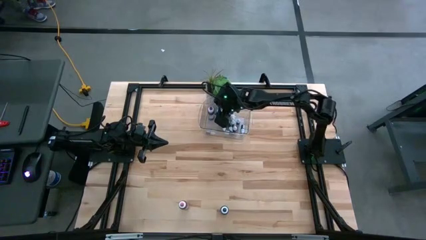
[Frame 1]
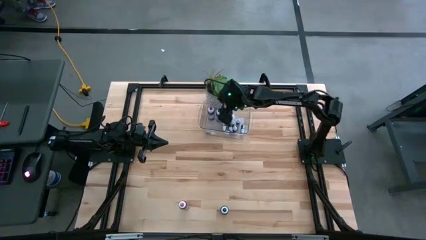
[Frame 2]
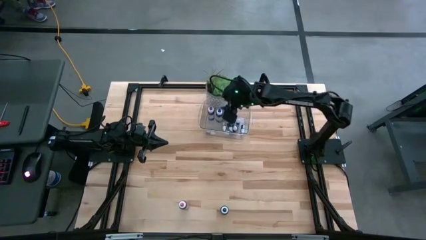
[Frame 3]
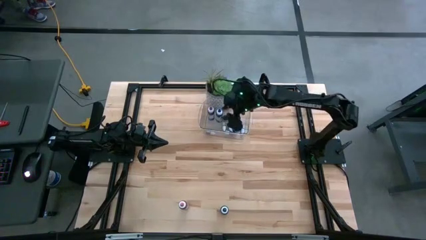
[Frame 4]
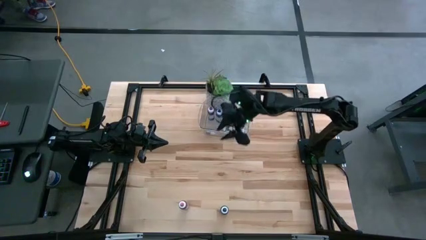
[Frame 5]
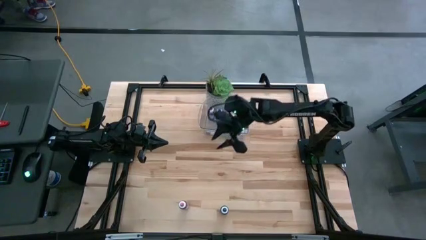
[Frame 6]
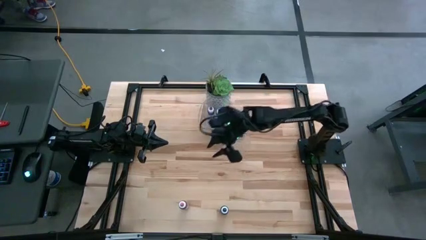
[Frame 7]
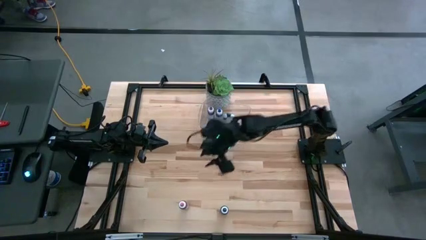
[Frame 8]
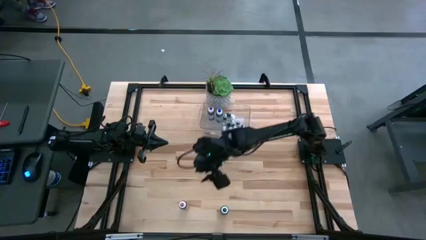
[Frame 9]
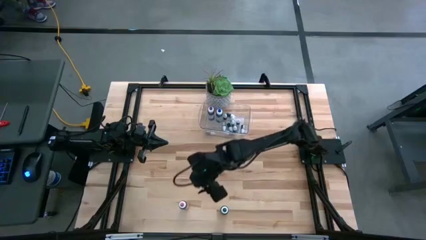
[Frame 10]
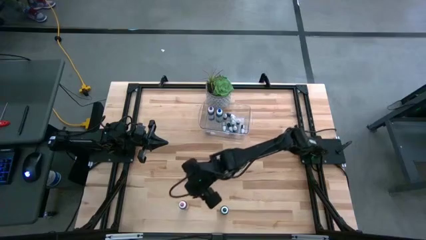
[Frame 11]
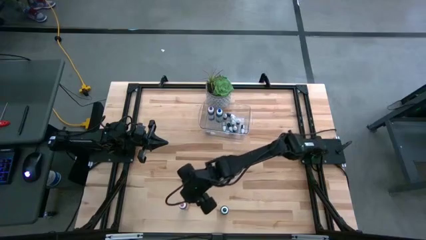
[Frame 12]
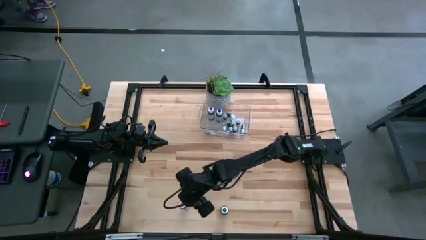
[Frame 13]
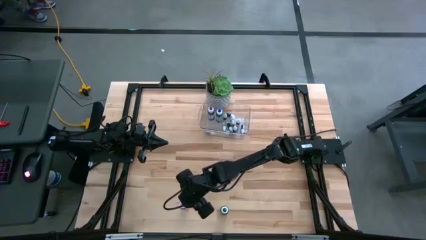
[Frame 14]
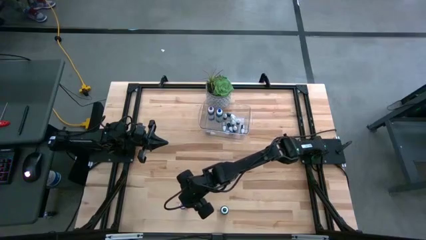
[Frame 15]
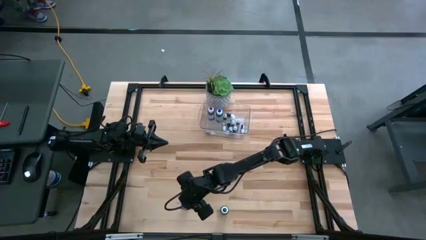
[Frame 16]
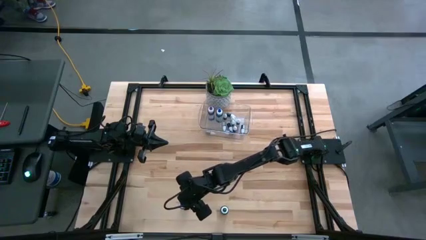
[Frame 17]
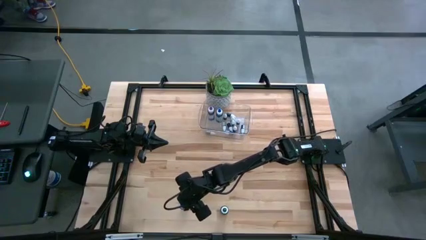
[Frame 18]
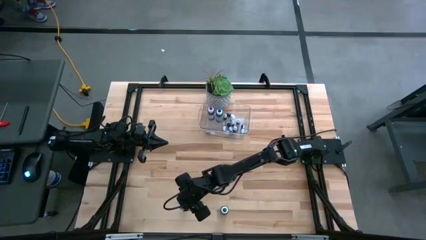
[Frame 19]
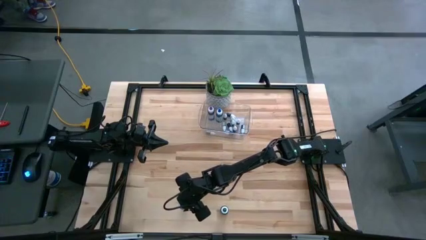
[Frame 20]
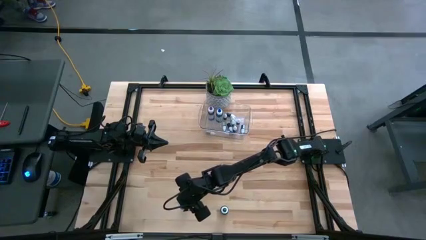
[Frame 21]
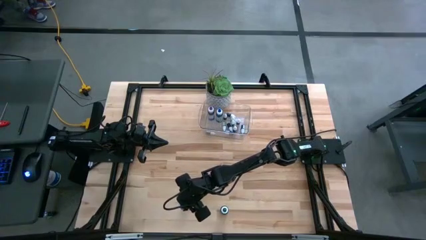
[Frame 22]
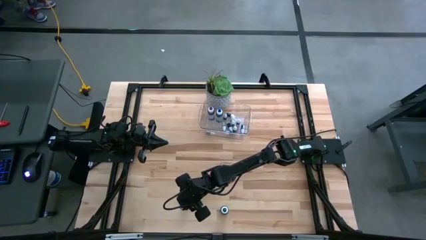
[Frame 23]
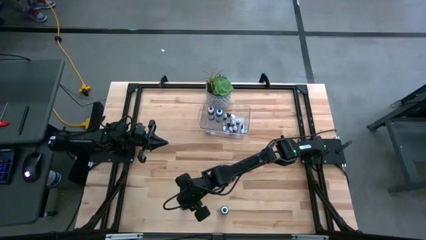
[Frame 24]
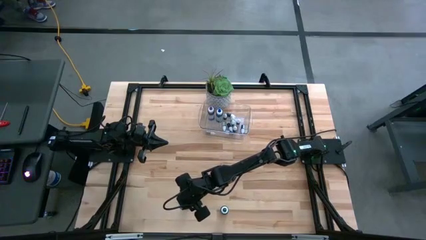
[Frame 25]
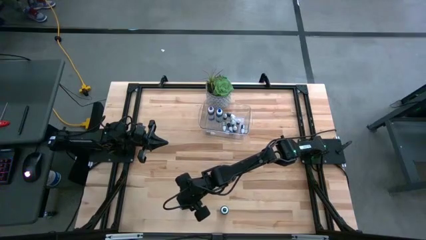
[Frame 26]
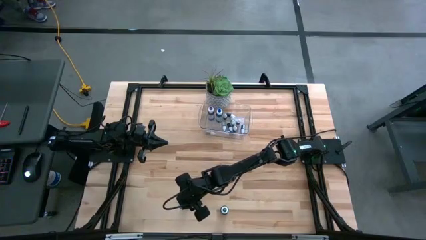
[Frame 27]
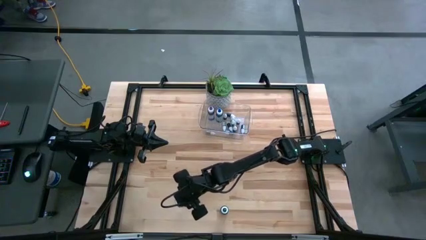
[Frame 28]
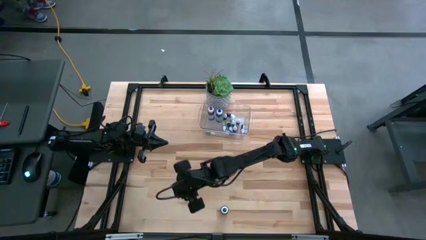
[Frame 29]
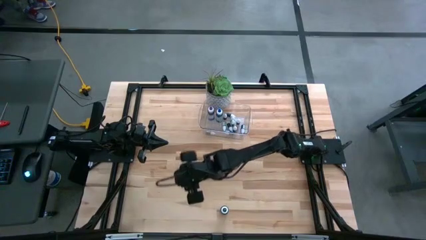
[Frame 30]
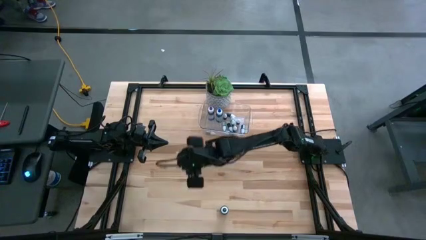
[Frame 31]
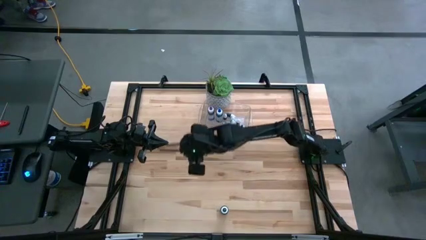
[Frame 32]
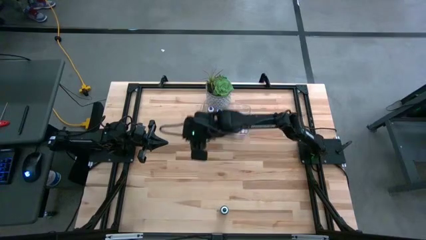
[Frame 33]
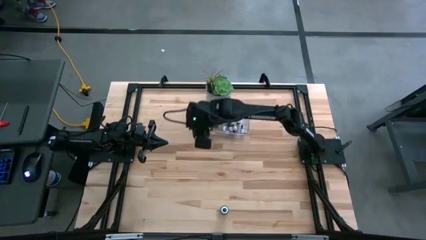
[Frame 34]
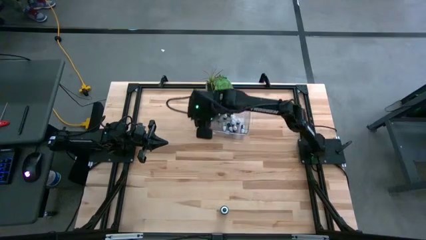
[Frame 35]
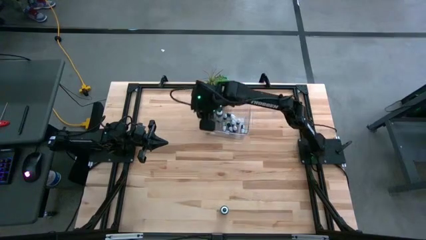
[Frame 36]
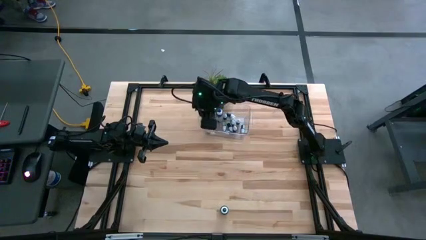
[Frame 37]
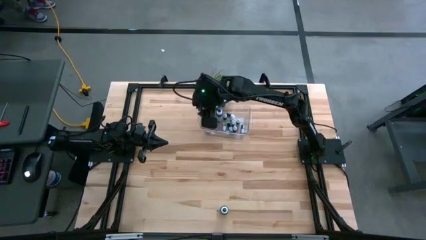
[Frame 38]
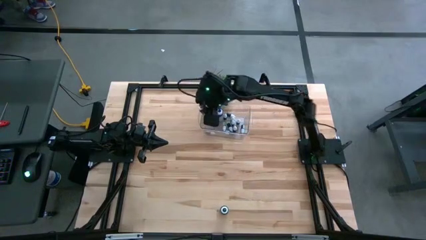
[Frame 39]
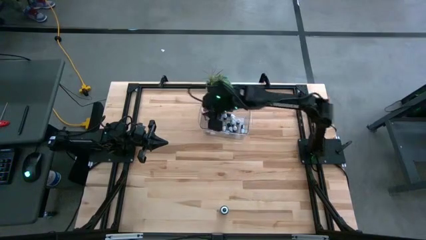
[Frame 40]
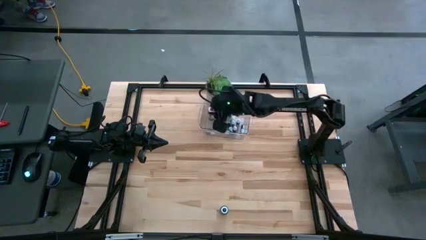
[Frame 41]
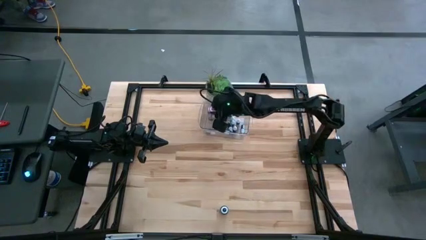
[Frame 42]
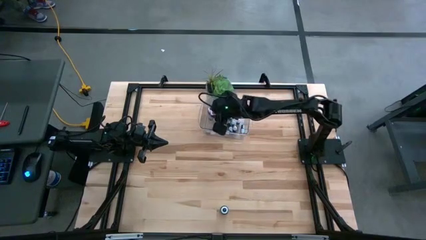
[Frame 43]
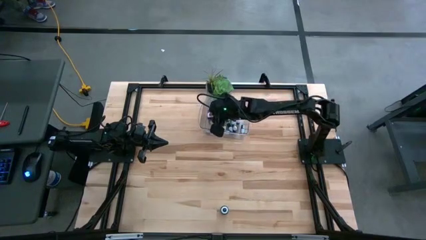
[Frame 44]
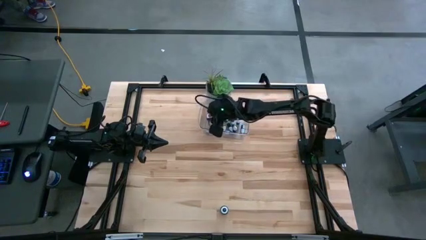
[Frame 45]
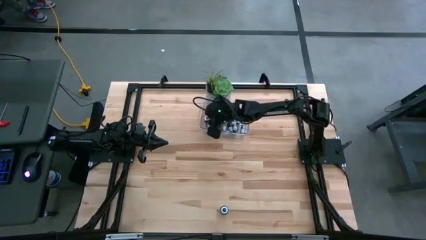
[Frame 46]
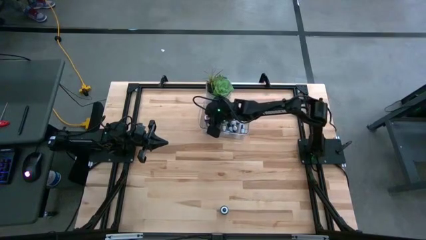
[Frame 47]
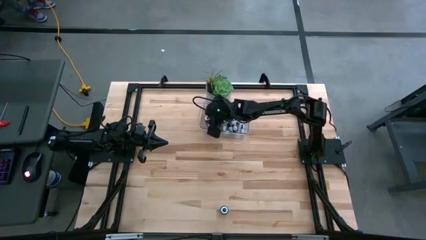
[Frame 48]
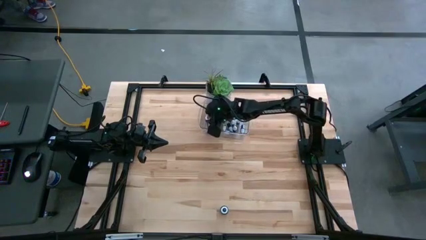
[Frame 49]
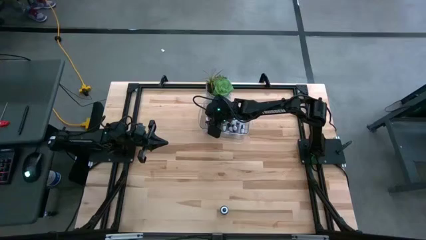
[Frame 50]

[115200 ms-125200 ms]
Task: Pick & Place food coloring
Put the large red food coloring bottle into the bin

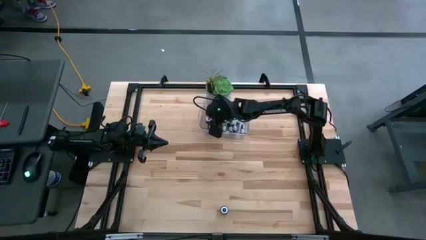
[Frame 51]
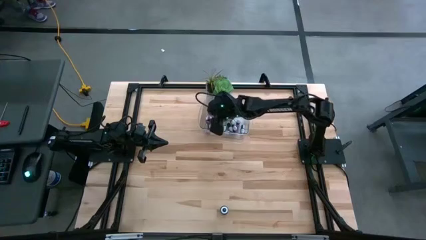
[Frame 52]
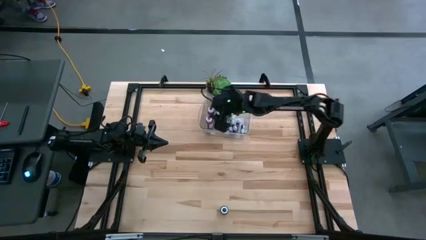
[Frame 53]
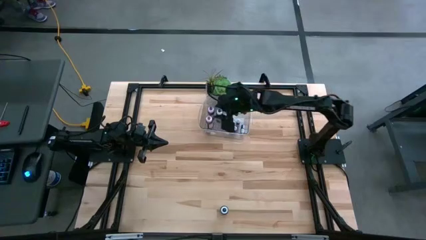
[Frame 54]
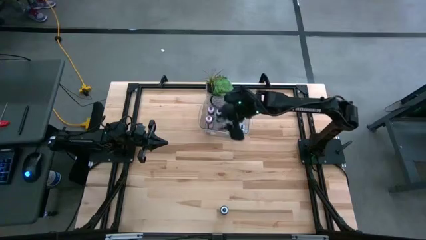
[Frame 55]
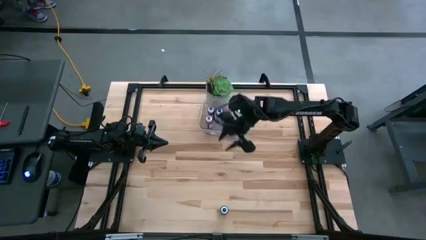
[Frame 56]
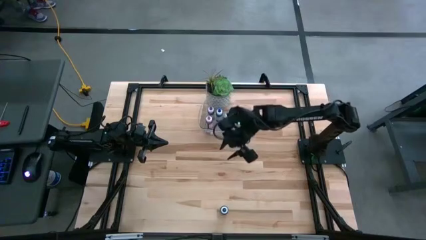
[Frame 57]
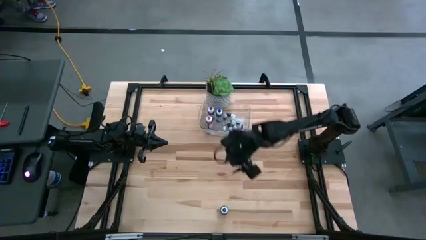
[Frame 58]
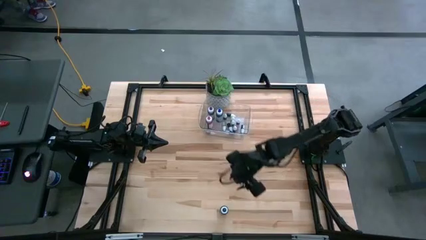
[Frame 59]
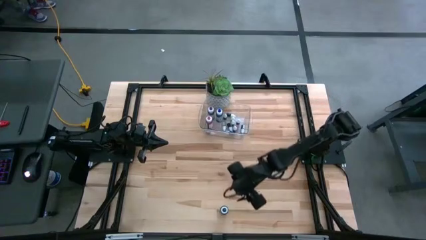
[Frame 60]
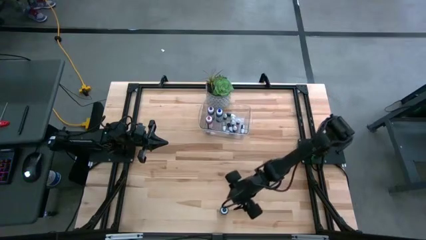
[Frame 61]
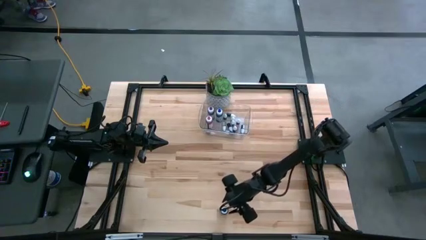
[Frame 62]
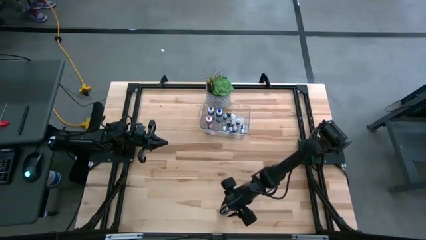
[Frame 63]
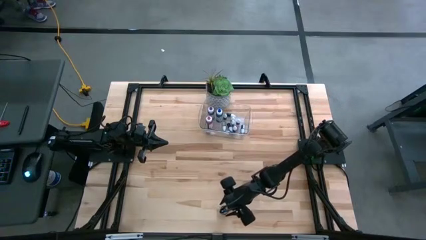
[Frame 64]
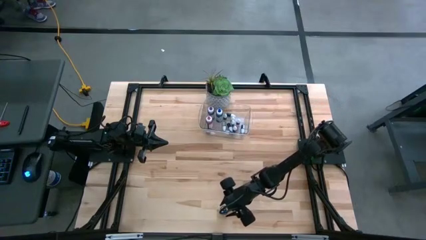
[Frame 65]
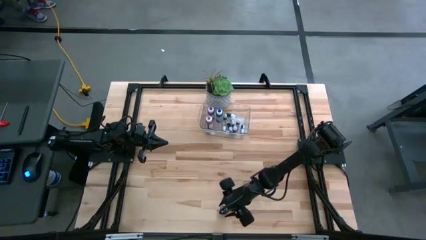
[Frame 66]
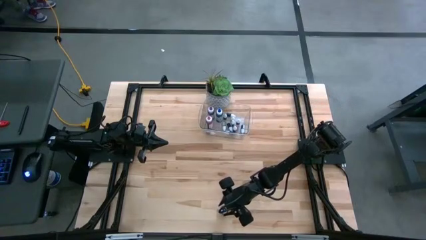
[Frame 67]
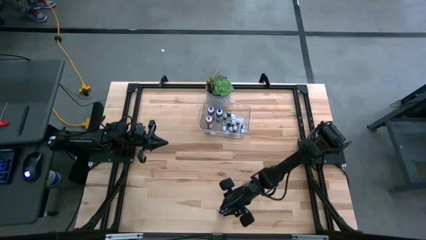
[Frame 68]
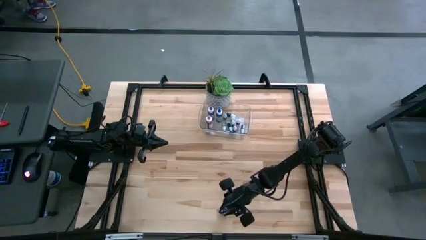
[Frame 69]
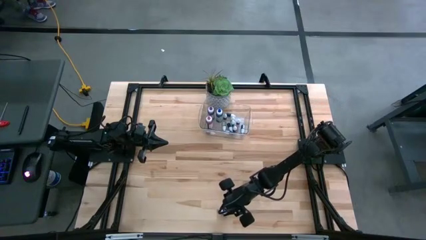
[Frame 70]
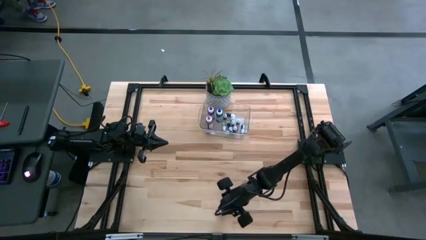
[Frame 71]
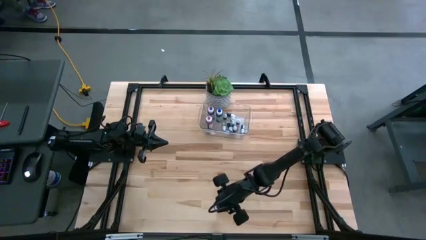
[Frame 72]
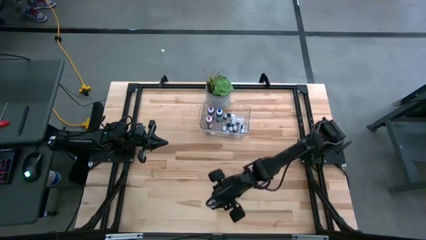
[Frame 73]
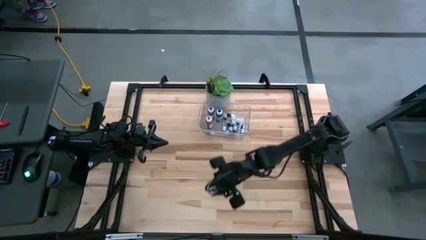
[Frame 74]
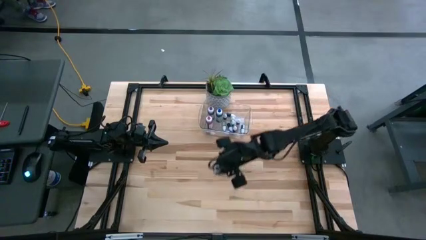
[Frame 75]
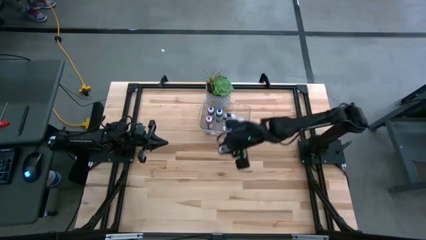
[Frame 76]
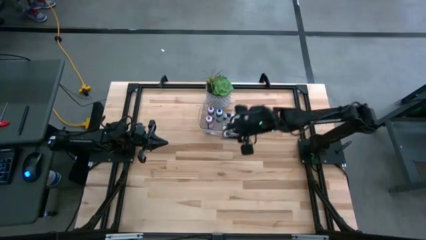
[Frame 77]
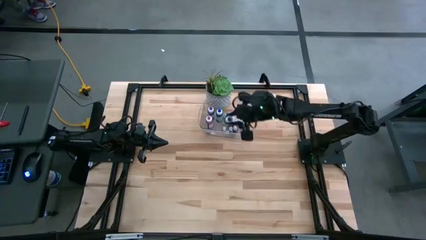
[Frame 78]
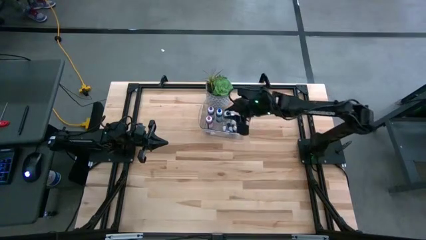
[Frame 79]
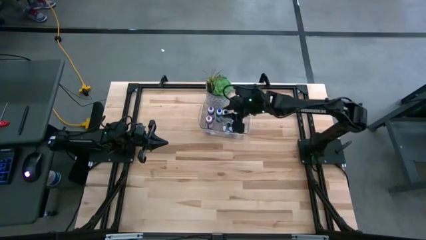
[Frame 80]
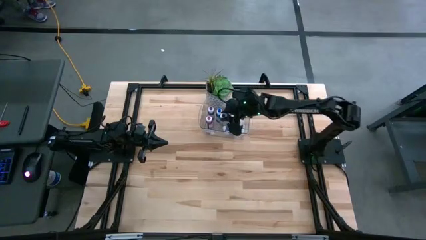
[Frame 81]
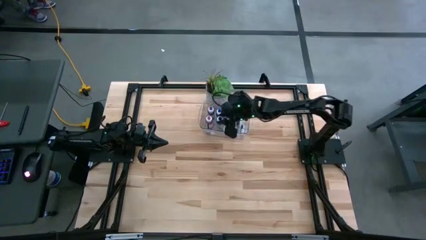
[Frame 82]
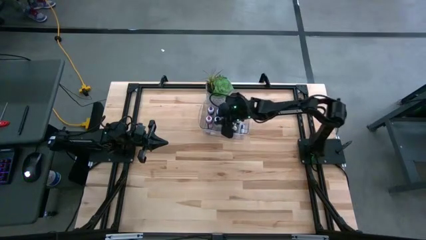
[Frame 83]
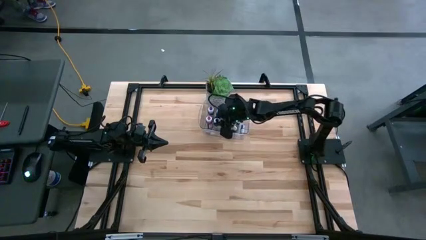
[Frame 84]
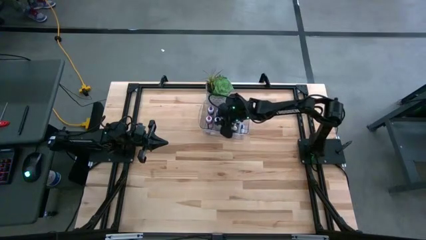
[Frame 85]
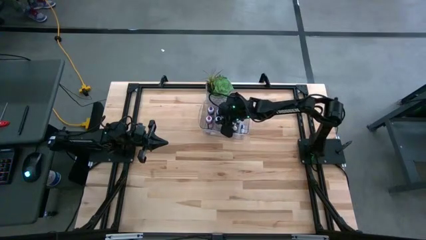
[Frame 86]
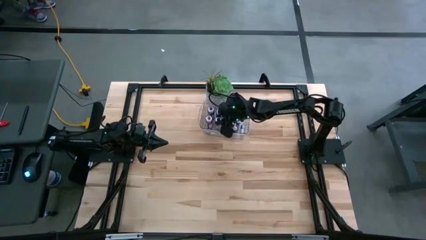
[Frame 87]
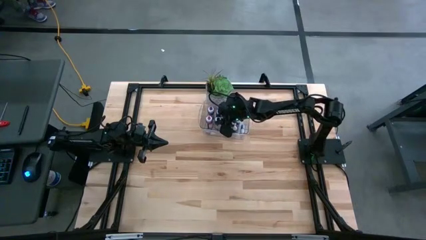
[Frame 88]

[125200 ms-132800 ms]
Put the large black food coloring bottle into the bin
